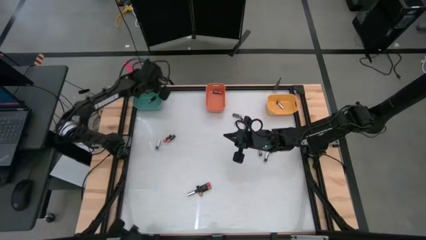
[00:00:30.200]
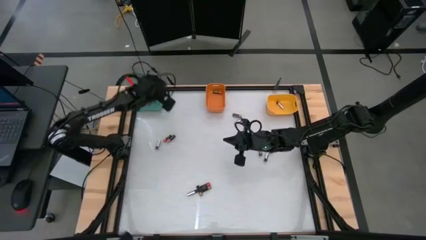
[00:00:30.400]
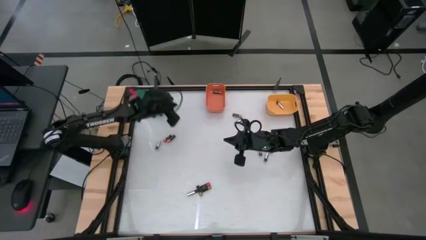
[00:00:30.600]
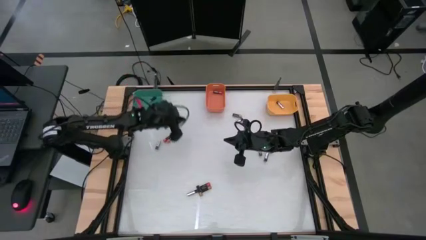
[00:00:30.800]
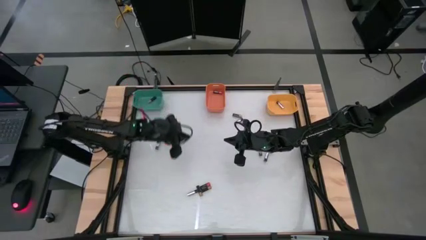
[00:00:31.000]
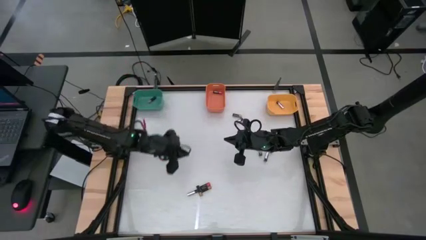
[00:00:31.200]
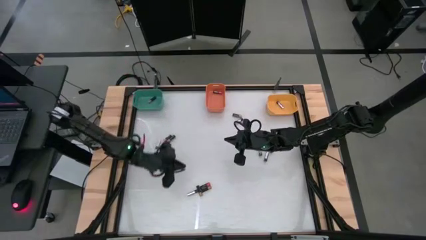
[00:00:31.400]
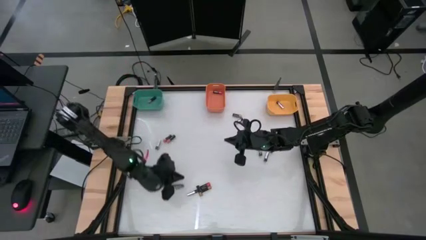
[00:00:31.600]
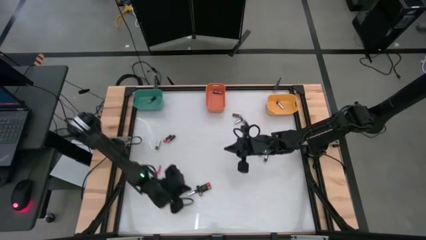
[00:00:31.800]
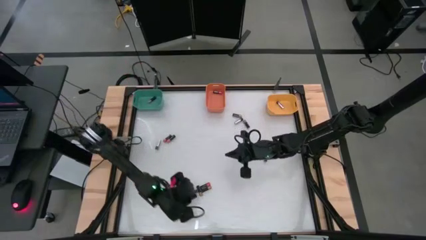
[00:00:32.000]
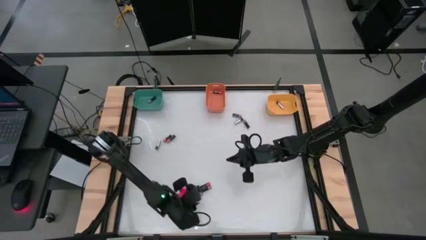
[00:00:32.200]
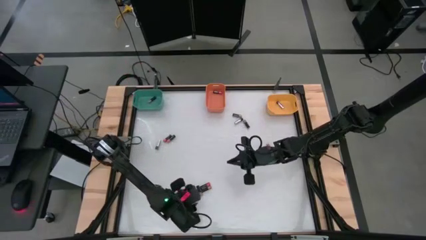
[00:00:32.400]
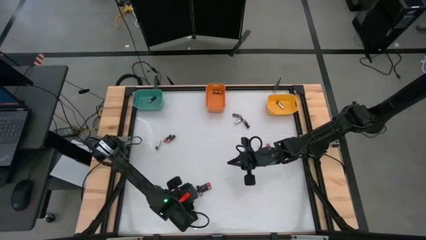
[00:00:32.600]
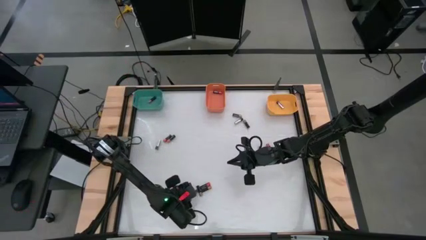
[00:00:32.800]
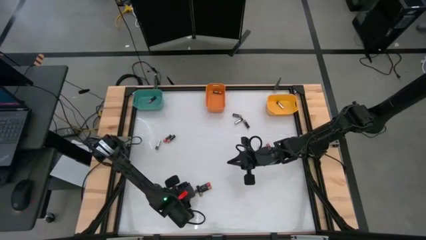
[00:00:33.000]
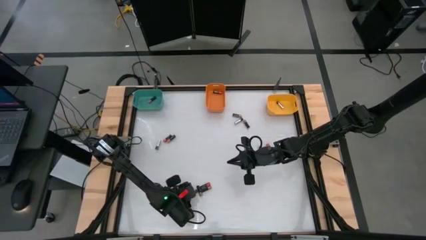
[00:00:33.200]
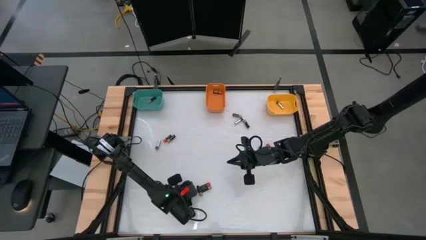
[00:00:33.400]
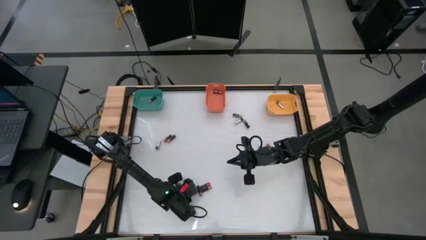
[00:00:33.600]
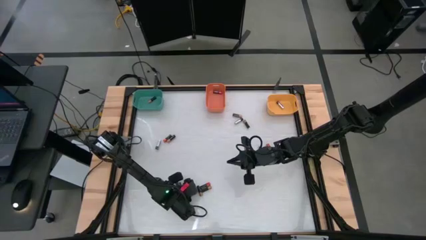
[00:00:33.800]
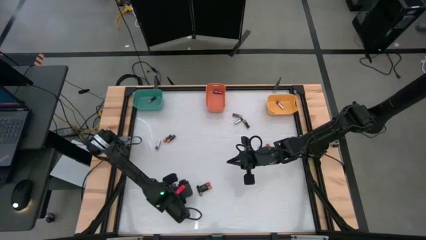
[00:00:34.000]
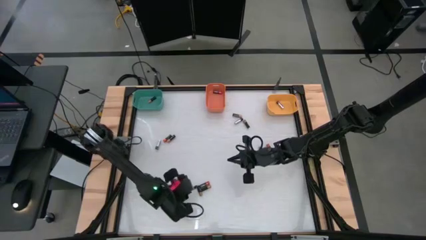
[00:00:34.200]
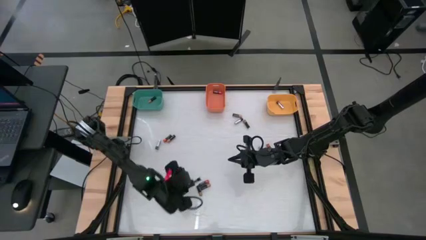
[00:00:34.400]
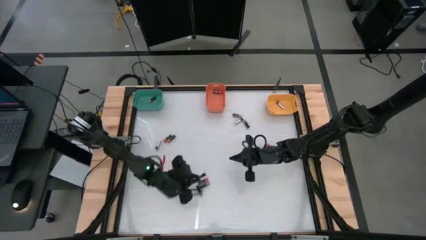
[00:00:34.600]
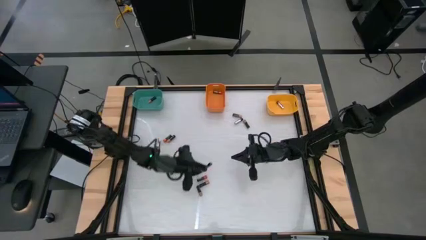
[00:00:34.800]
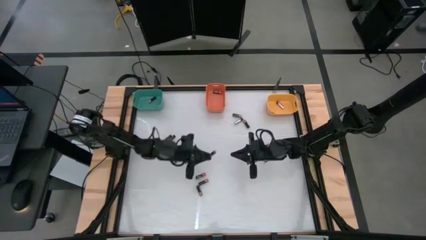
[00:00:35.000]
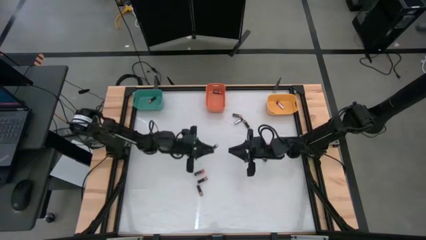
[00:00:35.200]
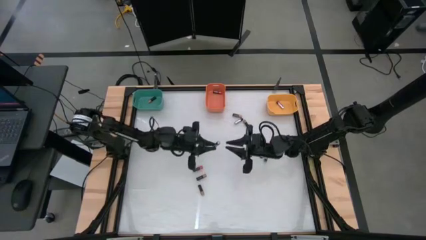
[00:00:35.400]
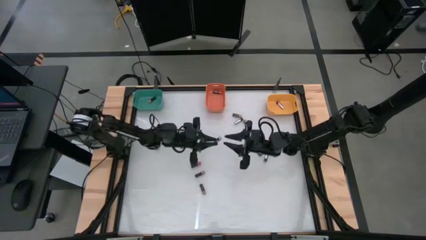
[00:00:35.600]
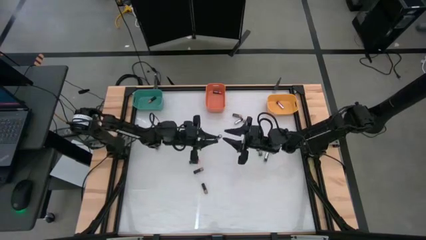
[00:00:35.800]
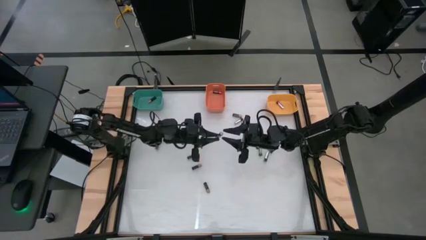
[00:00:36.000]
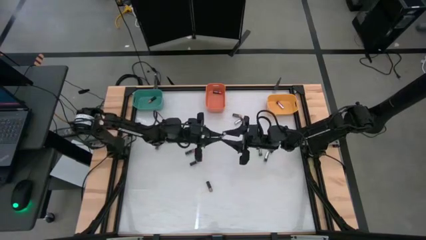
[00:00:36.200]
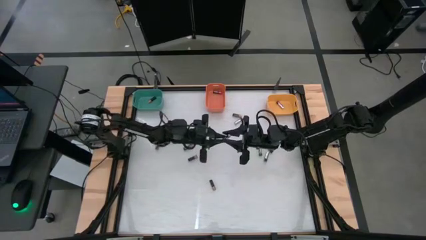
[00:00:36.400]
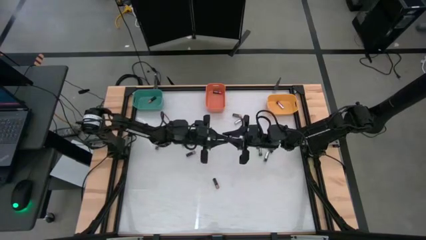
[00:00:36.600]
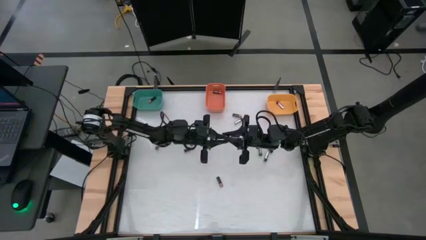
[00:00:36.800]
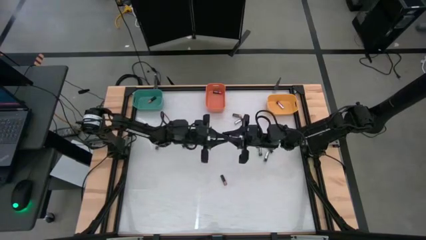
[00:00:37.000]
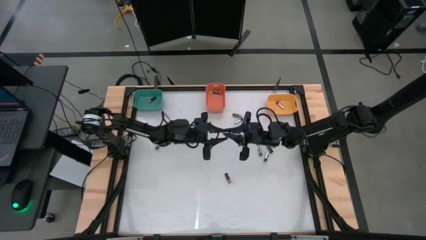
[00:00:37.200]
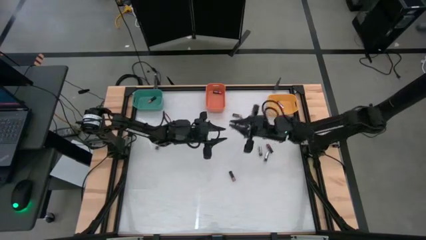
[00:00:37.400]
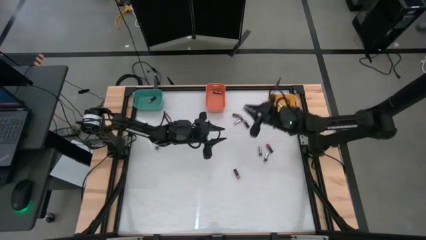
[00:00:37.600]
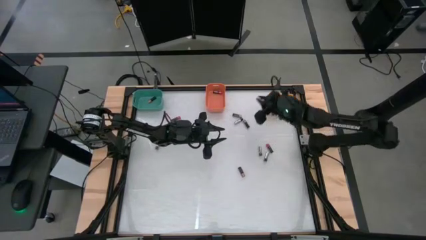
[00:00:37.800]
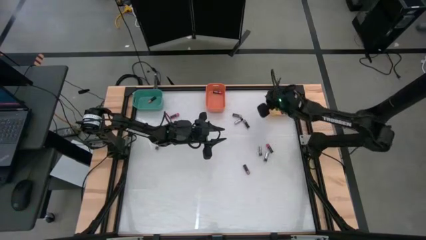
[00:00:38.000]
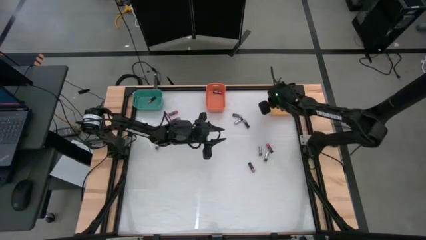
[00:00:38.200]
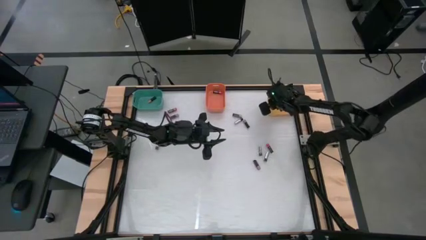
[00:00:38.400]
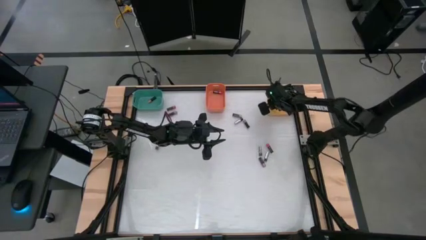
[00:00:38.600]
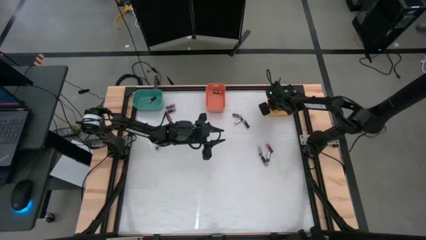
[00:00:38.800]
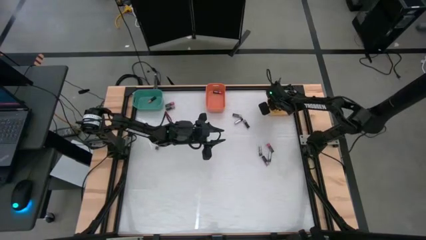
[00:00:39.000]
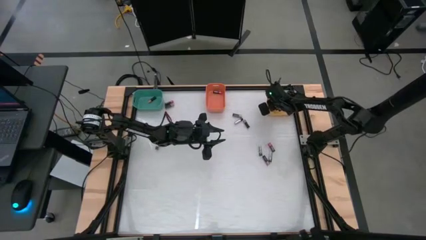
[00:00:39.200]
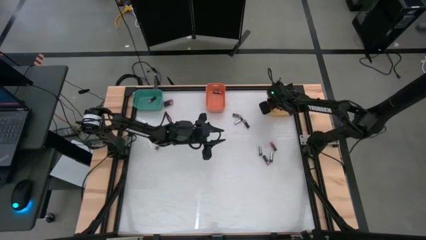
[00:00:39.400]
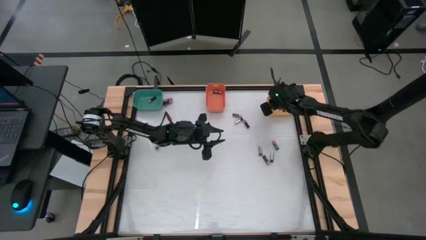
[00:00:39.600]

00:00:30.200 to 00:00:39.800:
Task: Sort batteries
Put the bottom center silver battery into the yellow container

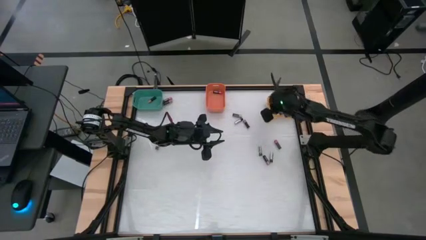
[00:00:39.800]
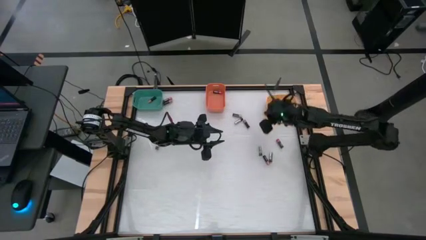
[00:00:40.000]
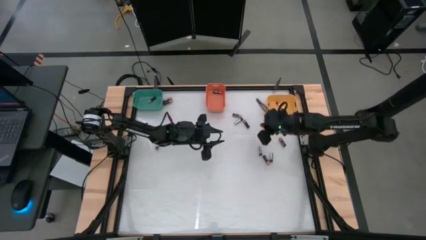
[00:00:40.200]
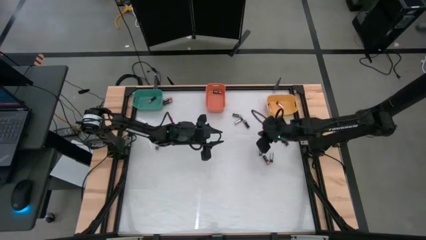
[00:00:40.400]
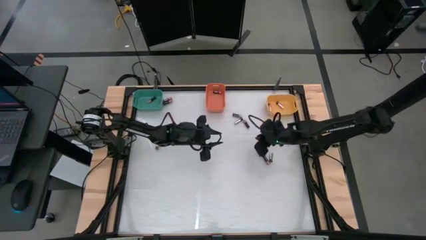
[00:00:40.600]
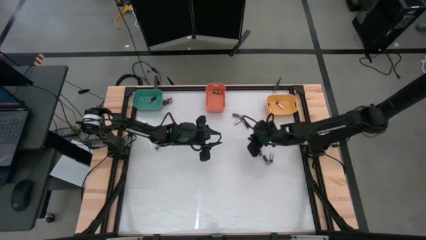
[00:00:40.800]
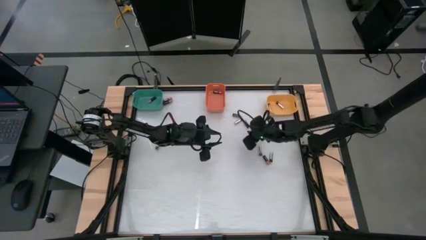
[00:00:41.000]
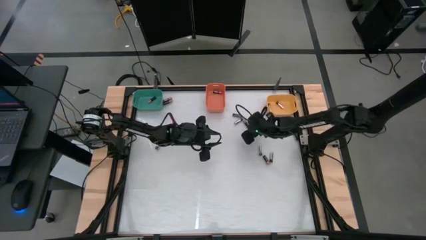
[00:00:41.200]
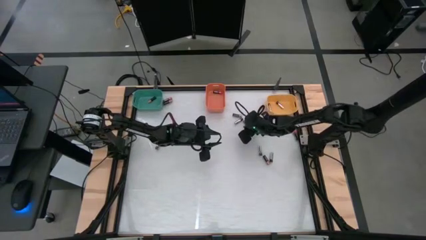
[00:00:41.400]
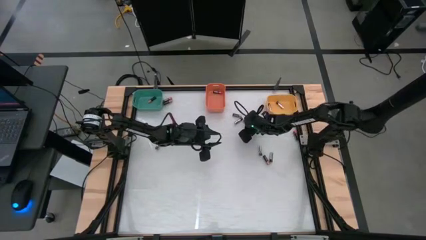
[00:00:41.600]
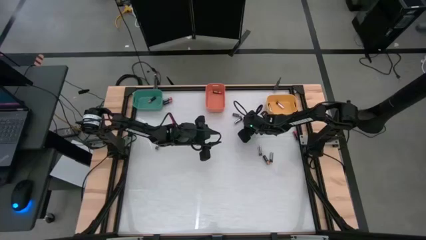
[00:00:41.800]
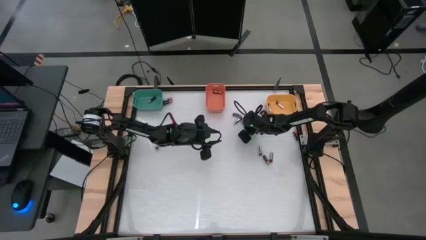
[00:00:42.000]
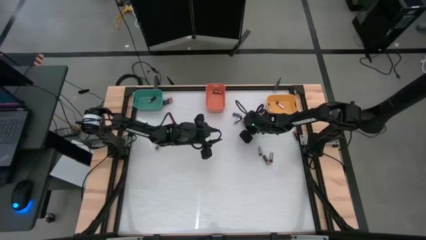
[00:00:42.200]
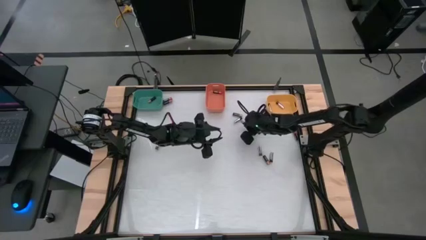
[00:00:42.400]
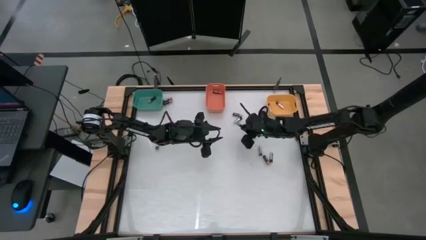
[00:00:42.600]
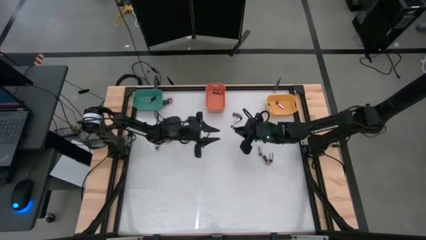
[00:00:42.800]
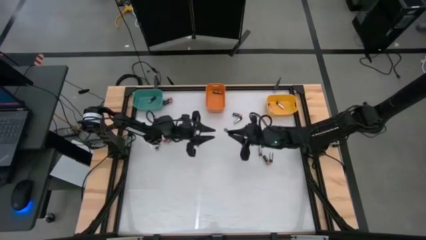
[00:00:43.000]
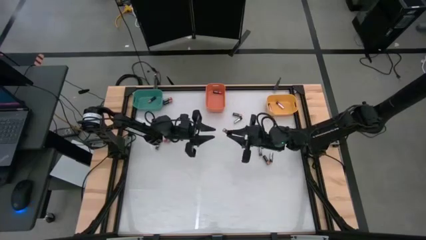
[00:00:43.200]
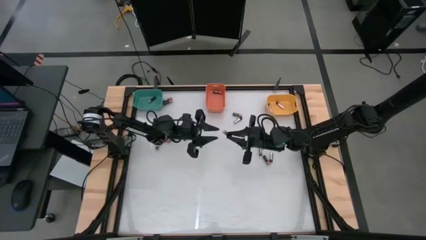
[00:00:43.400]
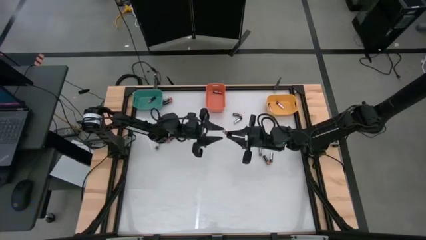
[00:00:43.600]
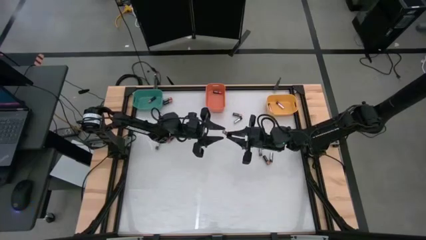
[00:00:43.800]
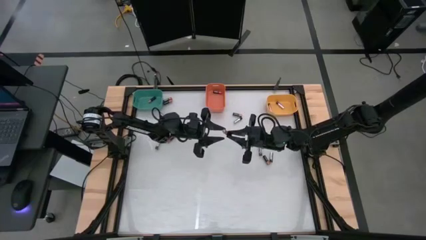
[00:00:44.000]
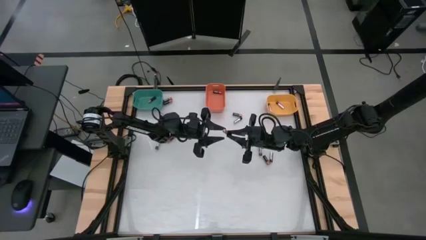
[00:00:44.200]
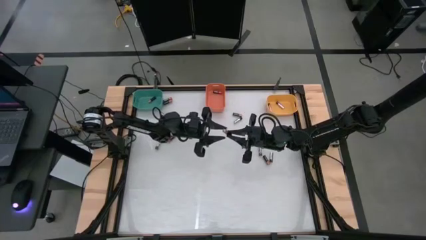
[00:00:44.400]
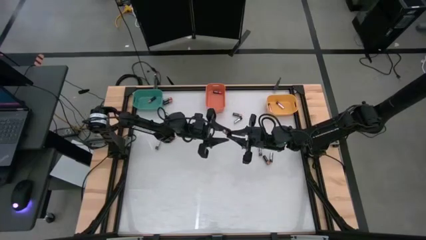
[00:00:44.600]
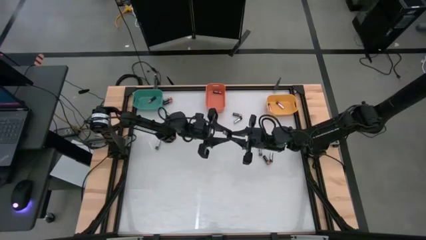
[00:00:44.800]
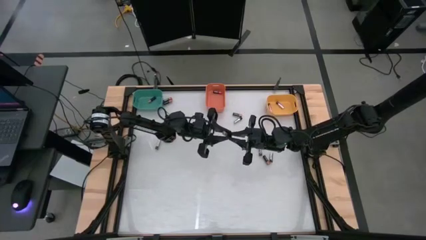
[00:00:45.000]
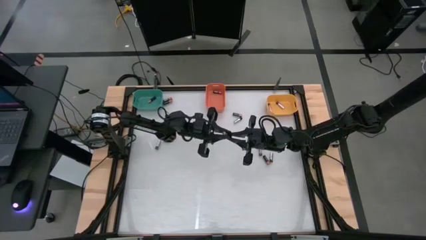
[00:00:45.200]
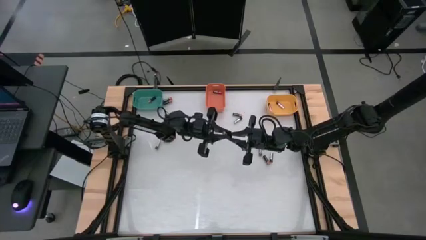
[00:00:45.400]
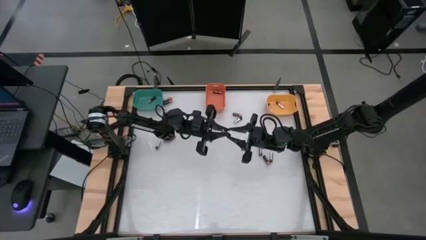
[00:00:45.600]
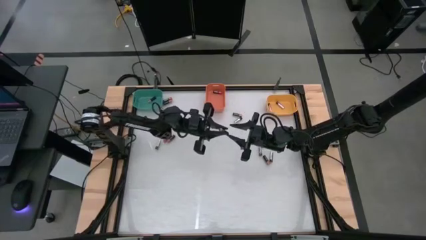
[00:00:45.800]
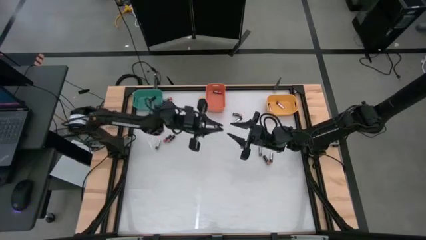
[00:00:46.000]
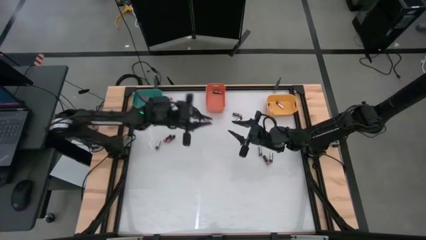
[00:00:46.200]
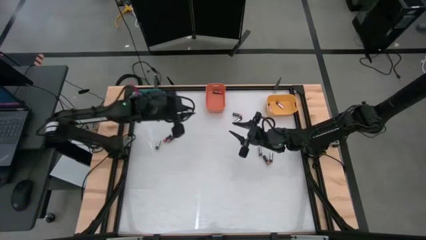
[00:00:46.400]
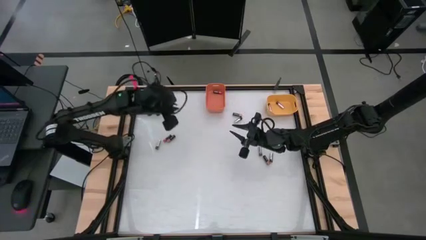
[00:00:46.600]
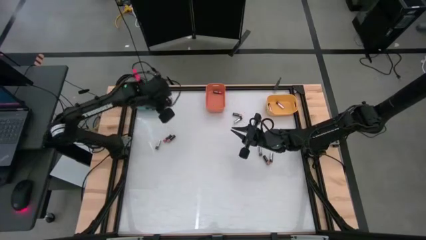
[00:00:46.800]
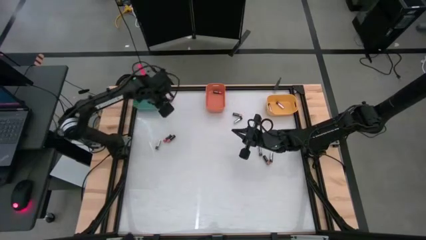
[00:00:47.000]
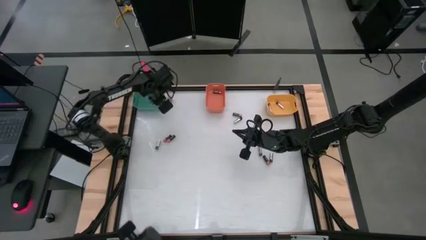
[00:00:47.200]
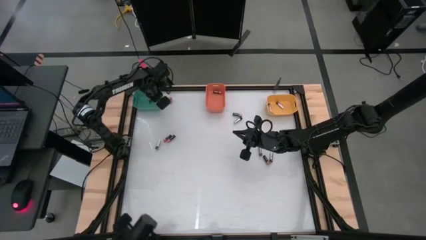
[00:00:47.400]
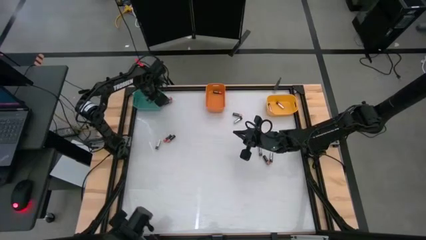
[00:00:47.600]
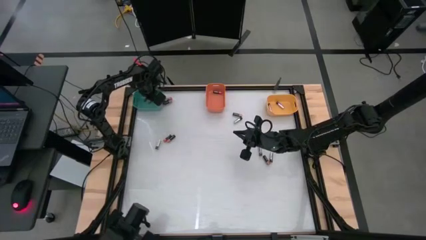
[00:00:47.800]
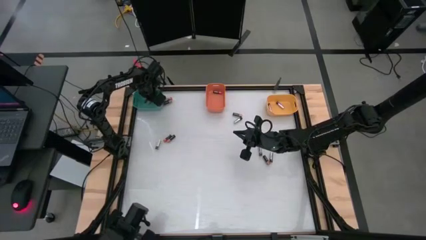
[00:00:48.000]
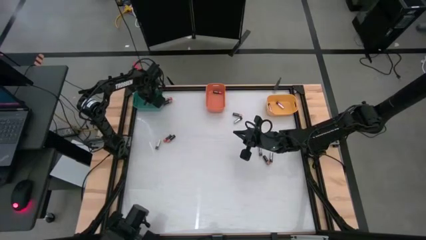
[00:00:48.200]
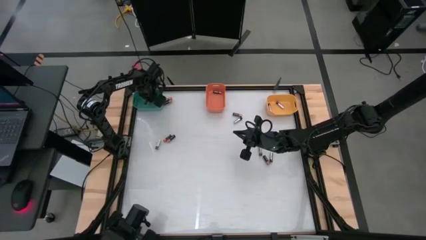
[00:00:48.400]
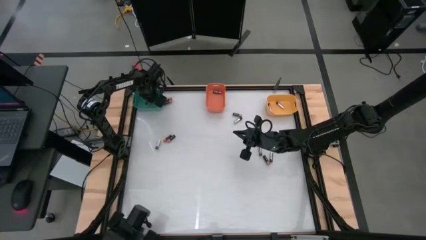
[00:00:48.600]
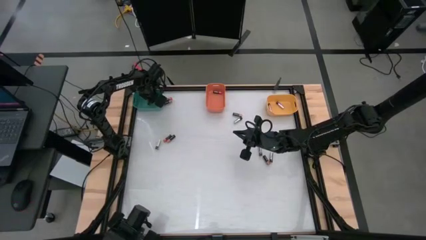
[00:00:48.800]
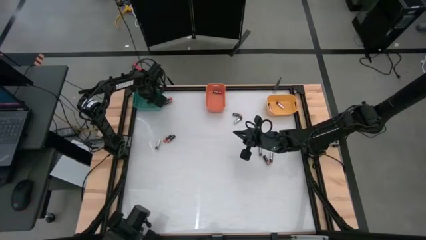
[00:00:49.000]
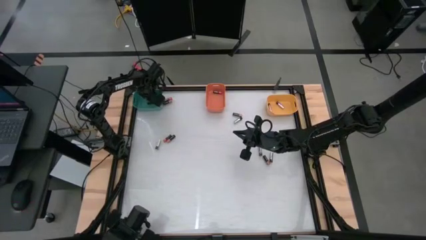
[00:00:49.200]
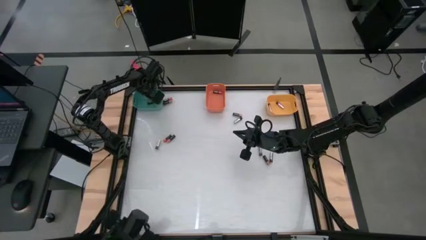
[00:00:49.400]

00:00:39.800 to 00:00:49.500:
Put the top right copper battery into the green container
